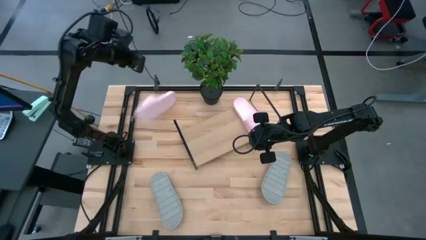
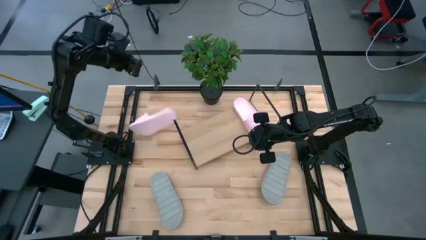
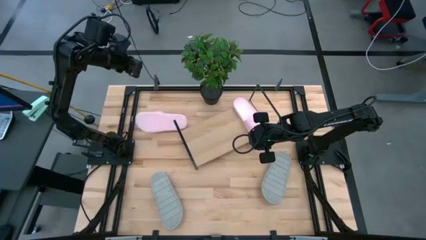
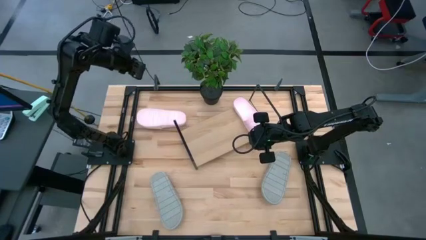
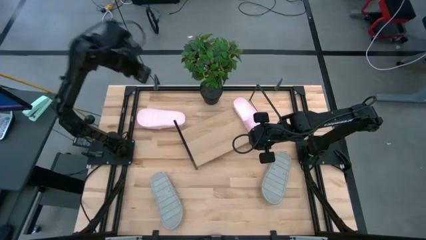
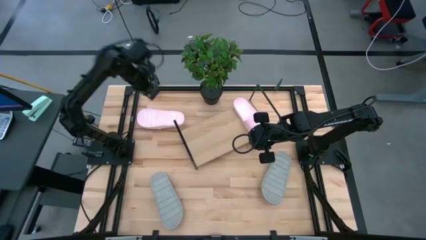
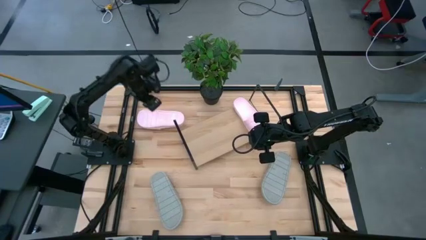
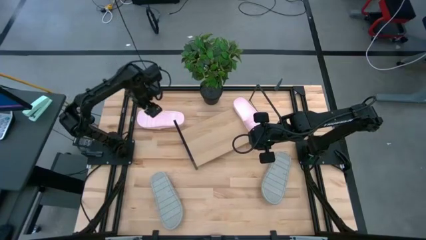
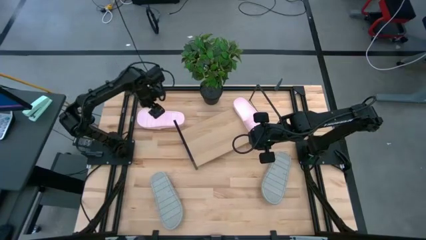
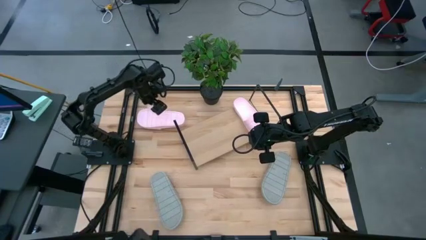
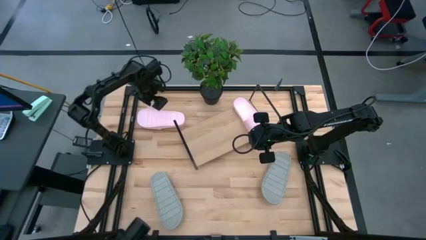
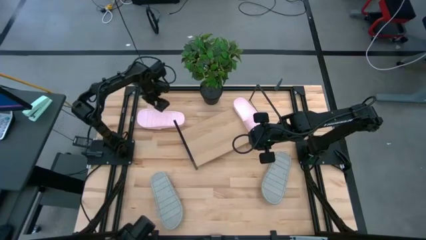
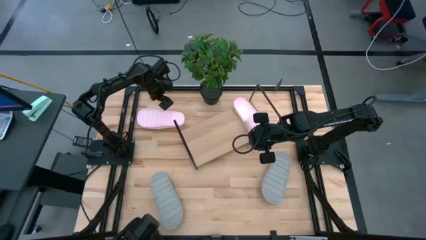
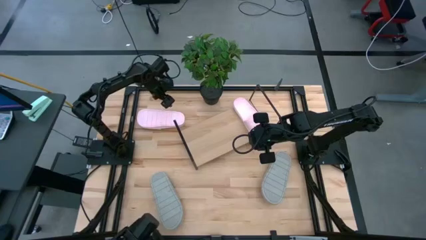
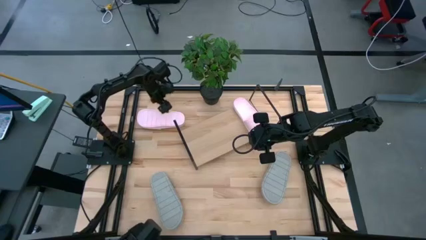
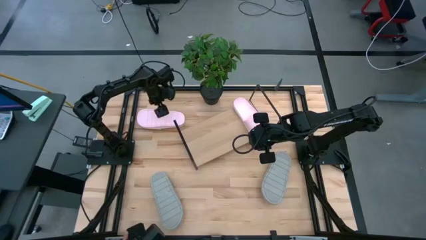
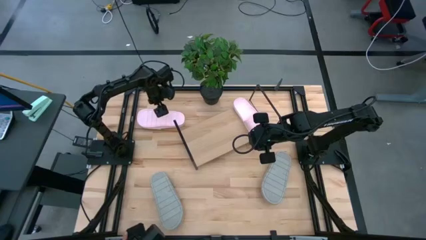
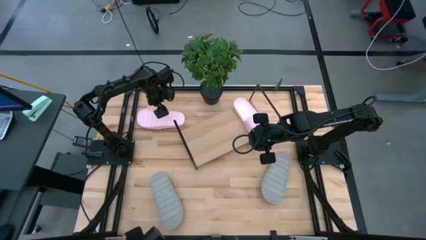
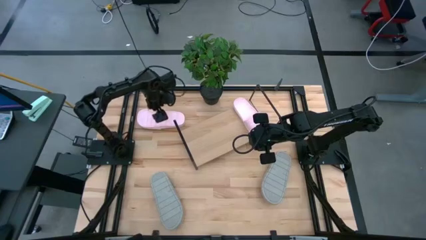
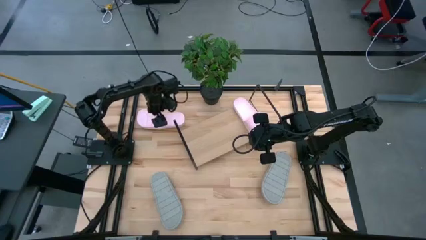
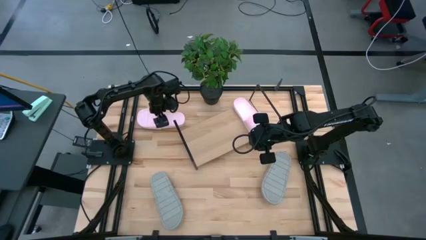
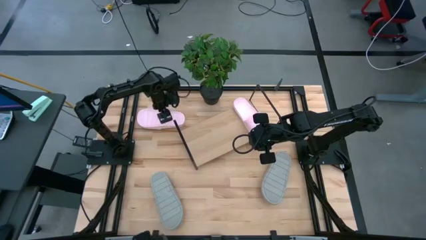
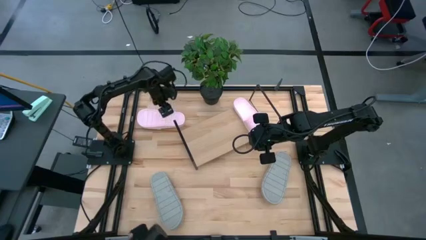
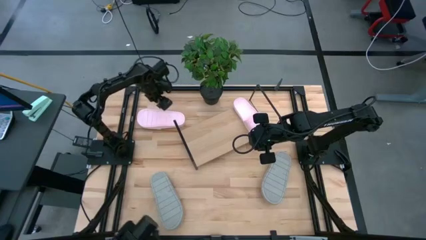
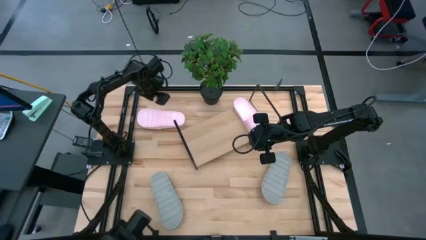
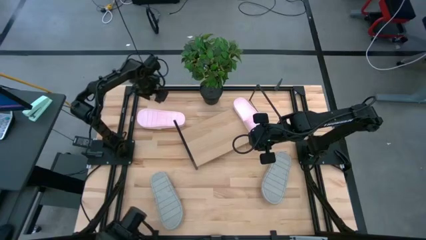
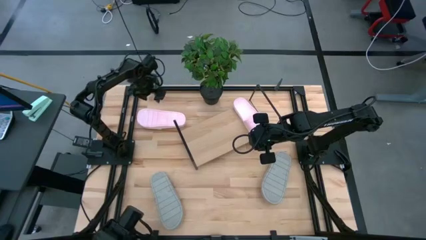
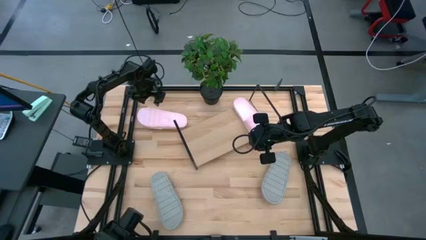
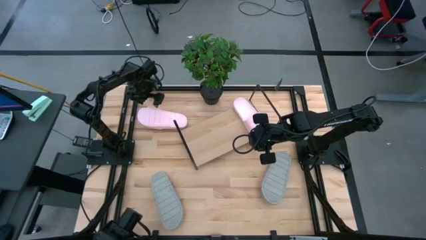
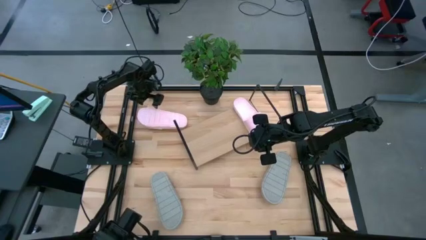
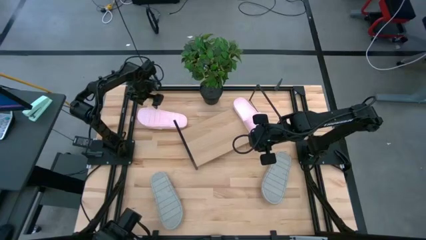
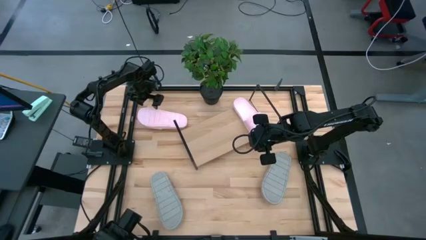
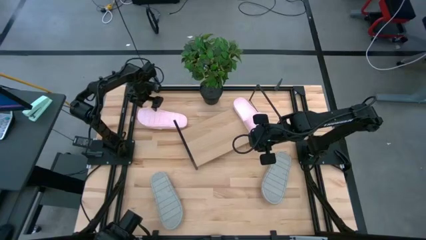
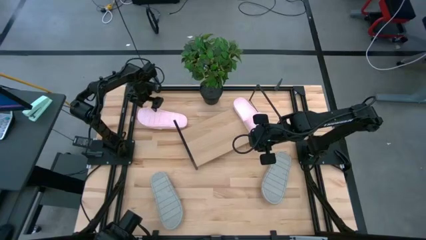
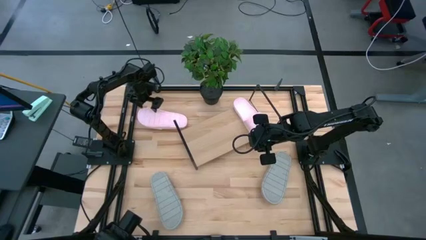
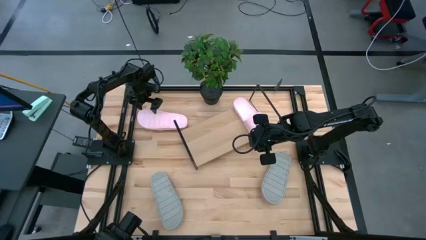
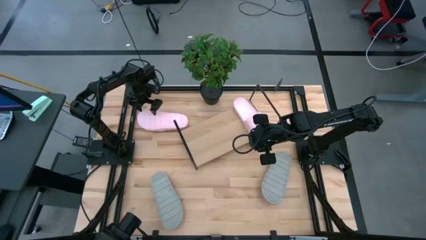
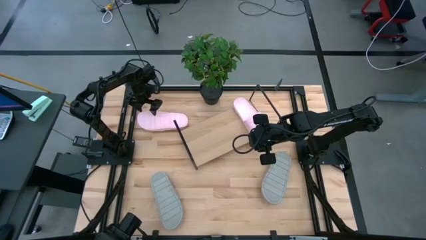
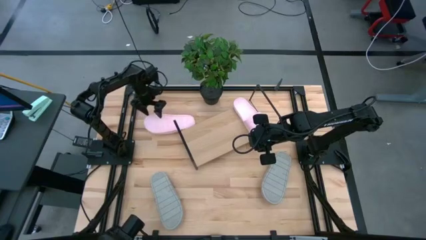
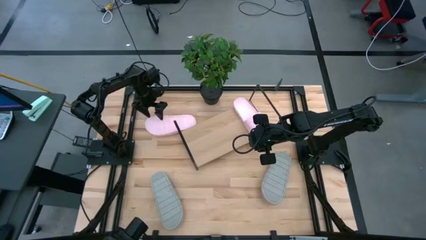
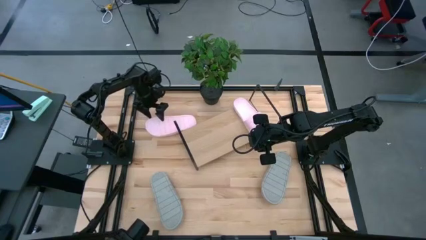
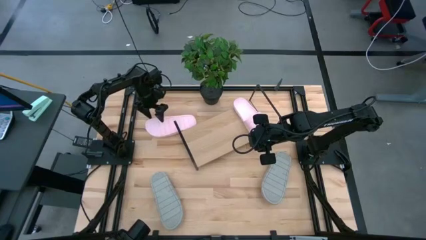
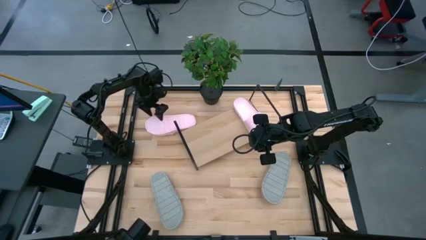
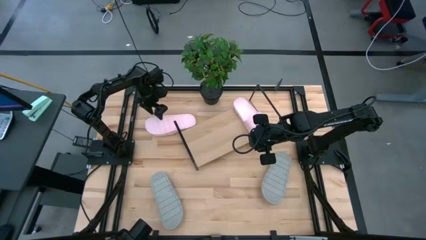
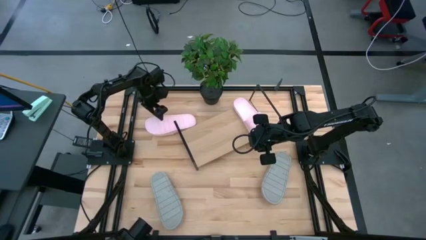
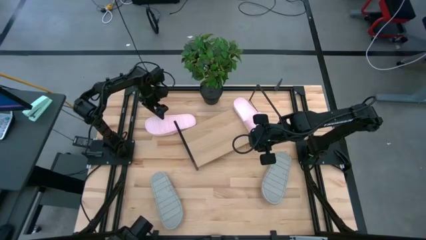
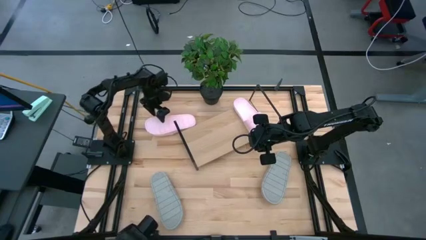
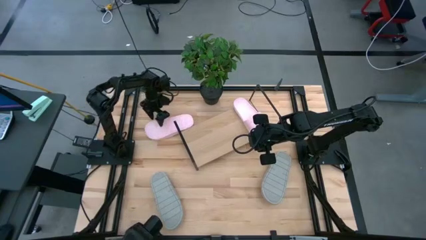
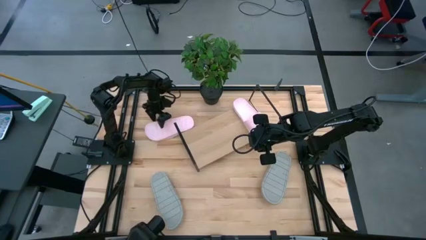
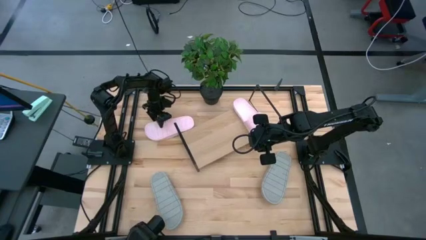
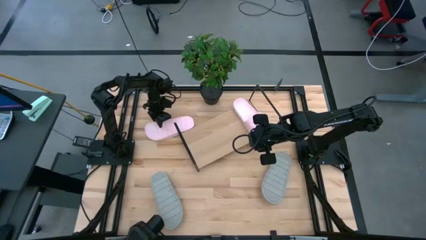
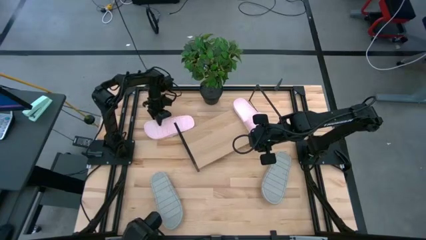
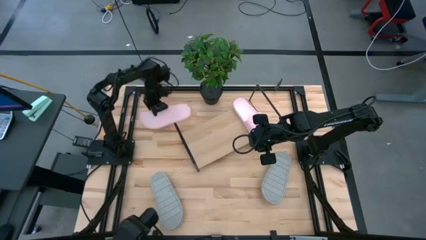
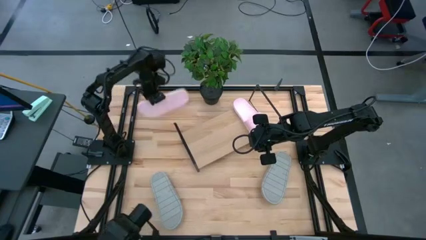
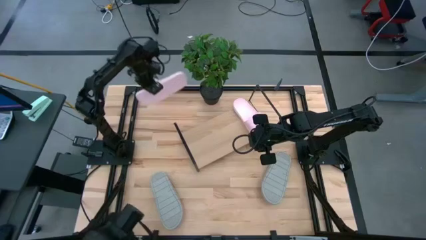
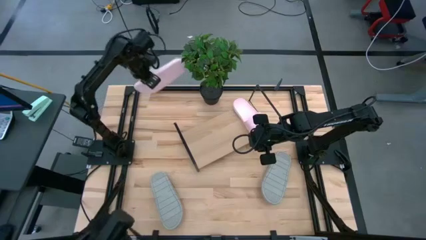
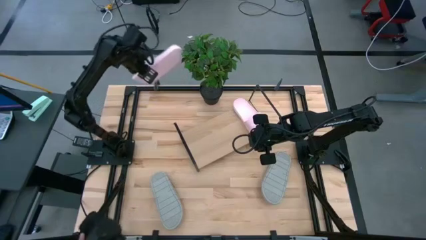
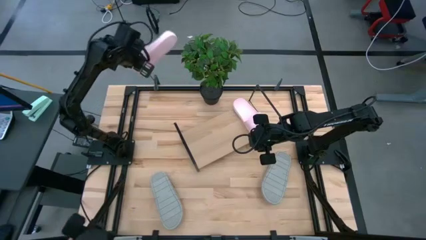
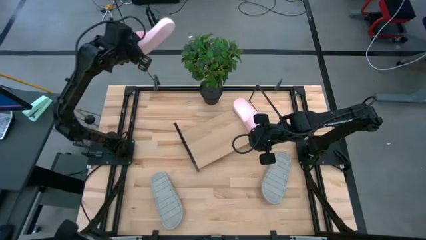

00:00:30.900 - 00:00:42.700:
Task: Pick and place slides into the shelf
Put the pink slipper on the shelf

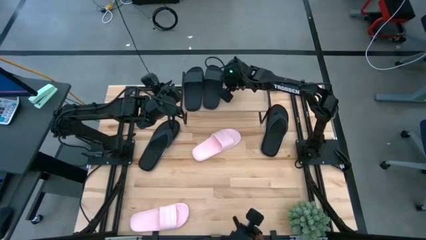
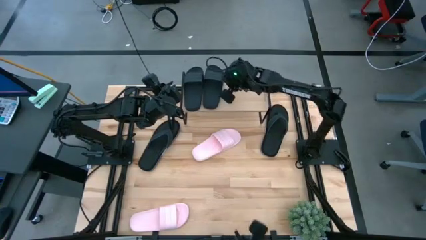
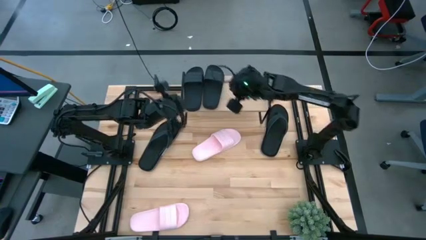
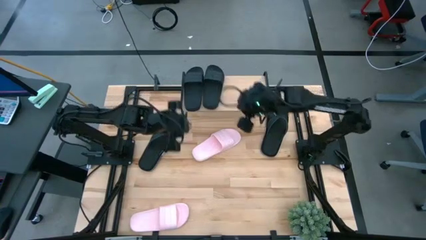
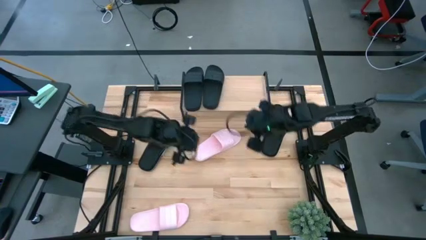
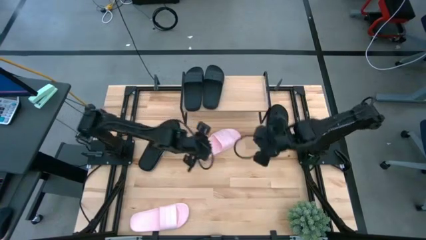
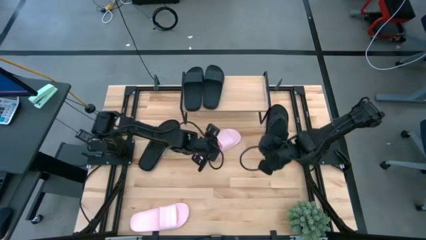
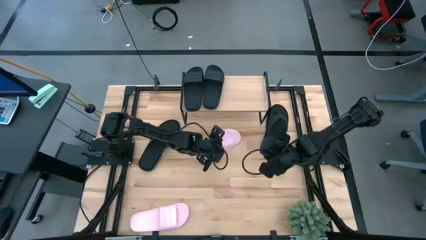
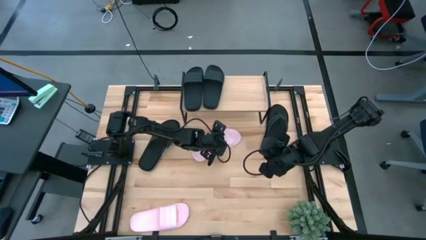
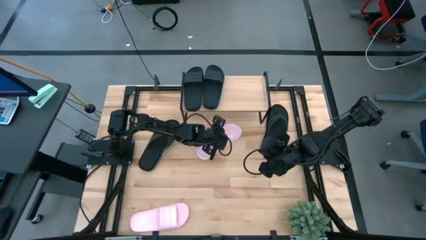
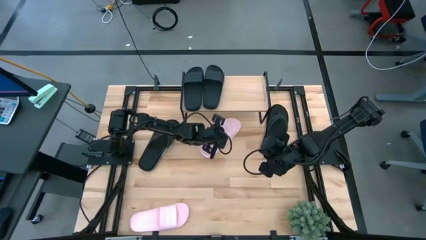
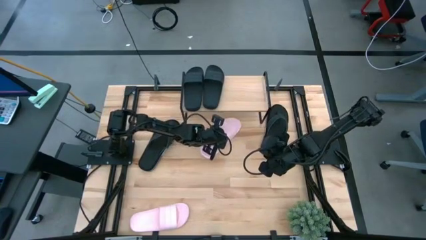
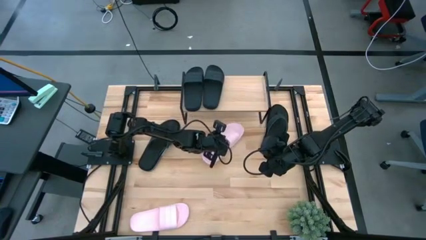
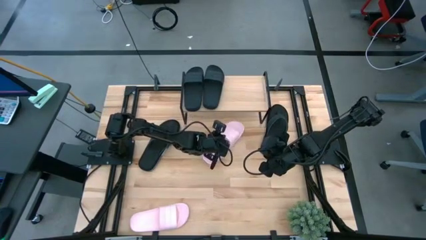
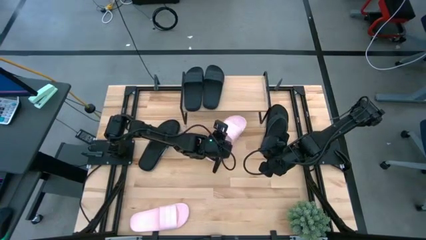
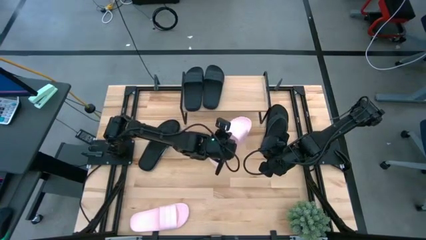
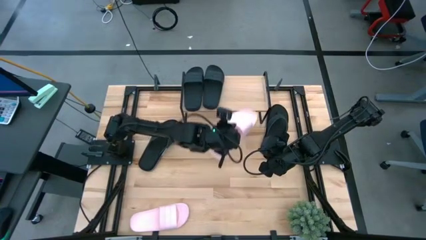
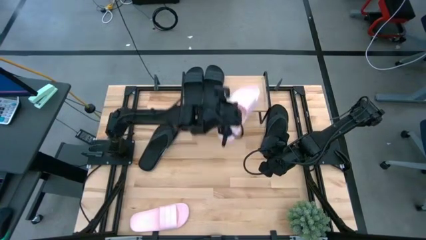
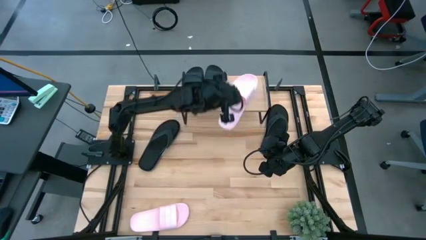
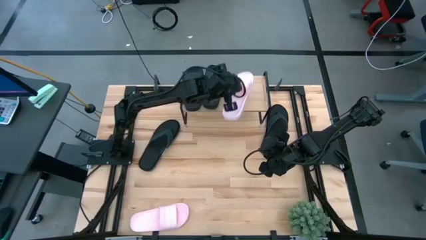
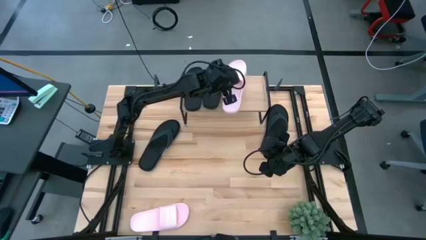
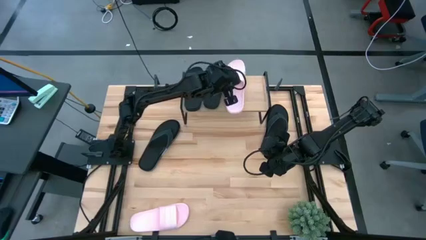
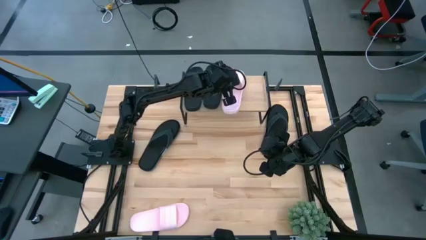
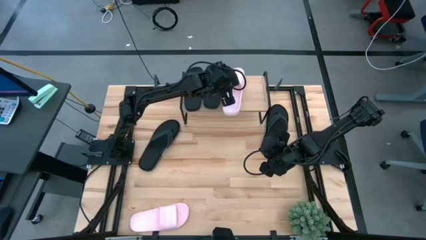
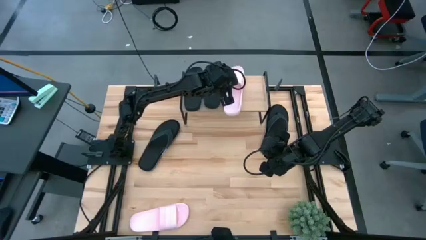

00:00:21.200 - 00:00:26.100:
Task: Pick and place slides into the shelf
Put the top pink slide on the shelf
